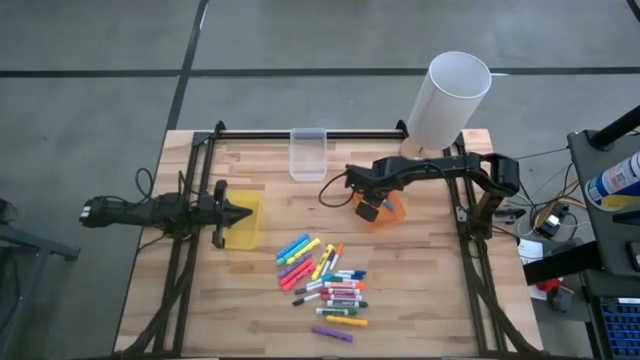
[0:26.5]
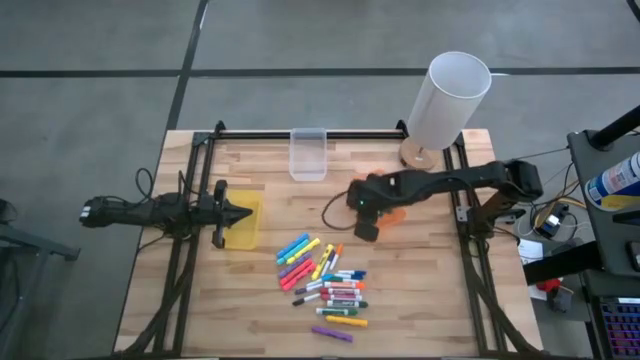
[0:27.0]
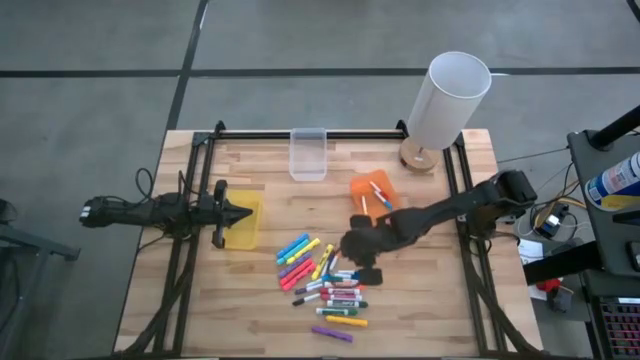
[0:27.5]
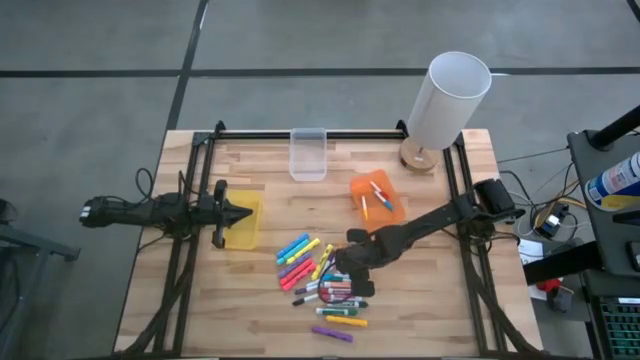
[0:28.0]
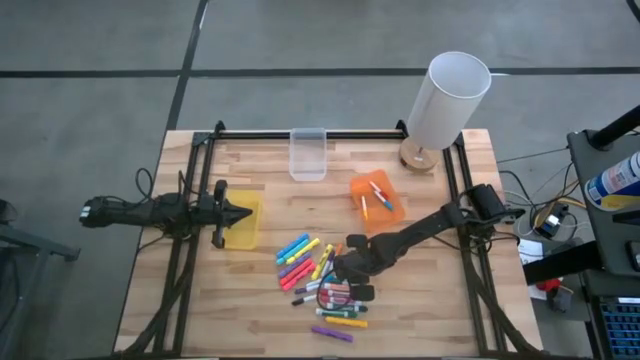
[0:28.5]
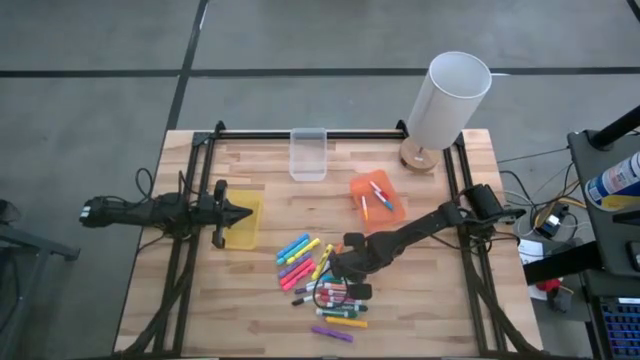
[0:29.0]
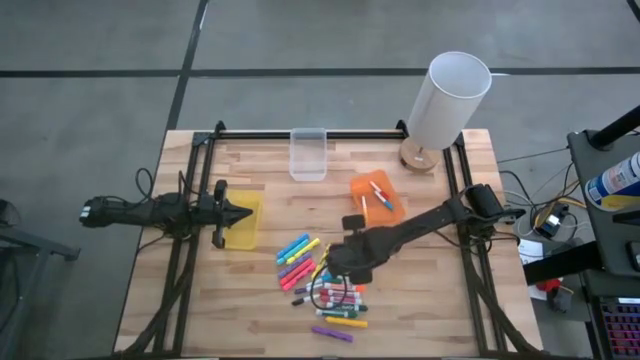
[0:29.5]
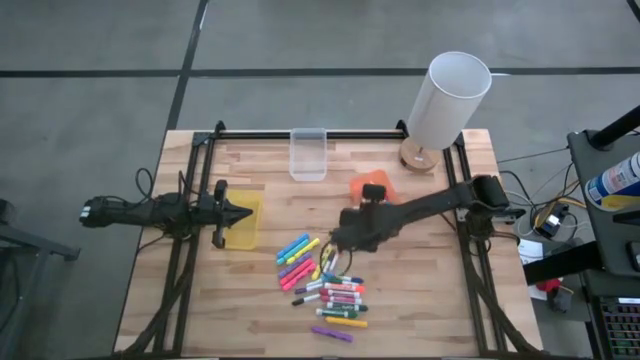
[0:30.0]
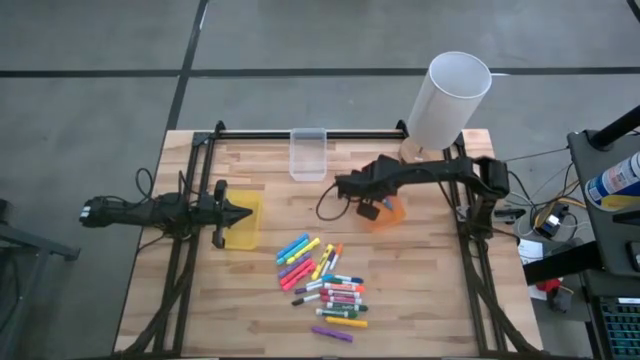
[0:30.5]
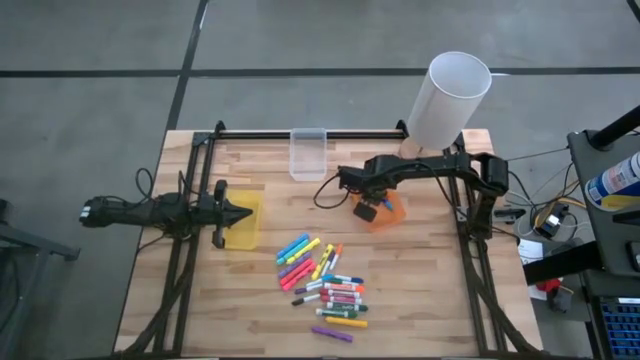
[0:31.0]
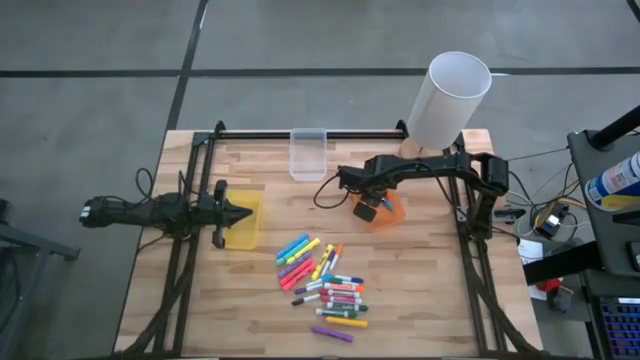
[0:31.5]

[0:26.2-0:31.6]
Task: Pick & Place Markers
Put the top small blue marker into the orange bin

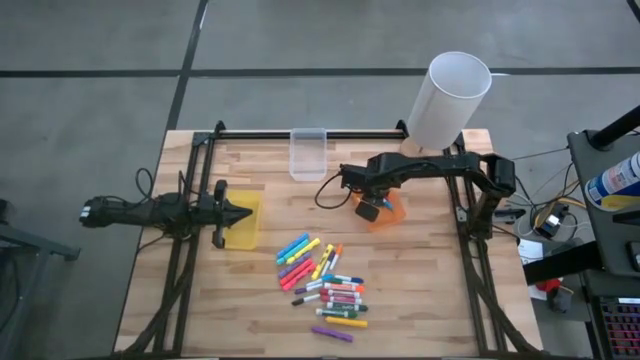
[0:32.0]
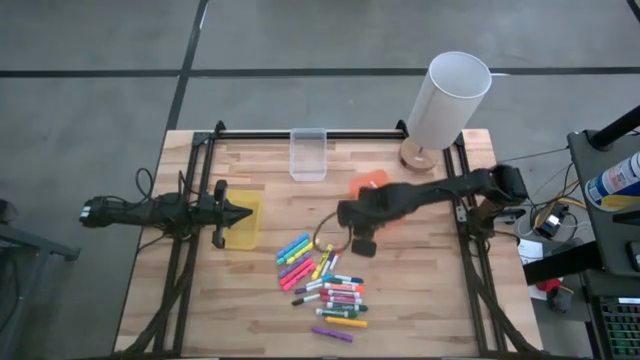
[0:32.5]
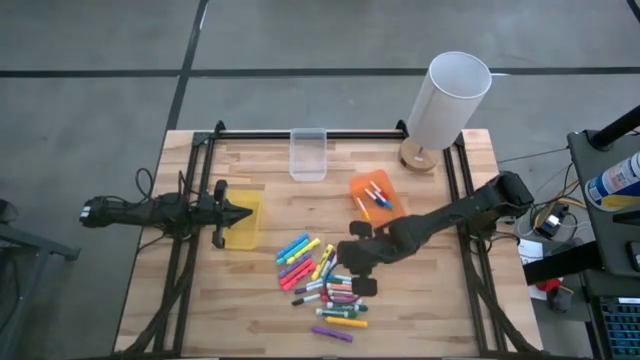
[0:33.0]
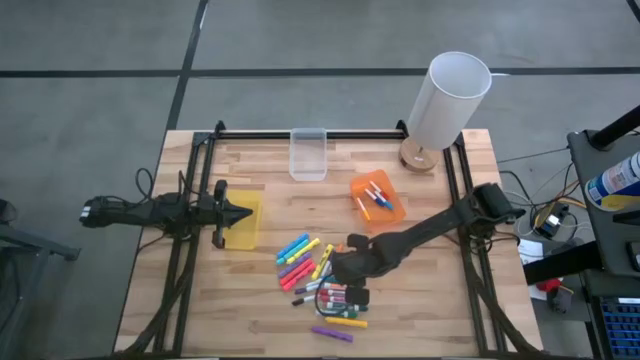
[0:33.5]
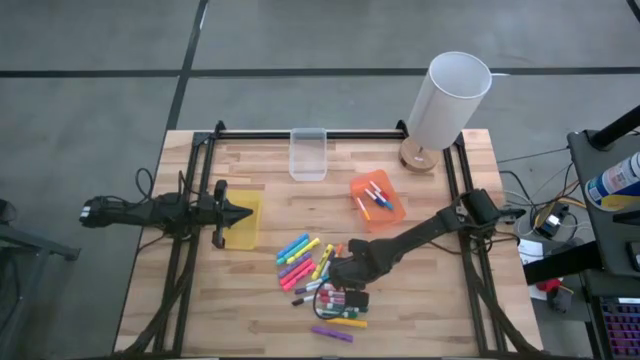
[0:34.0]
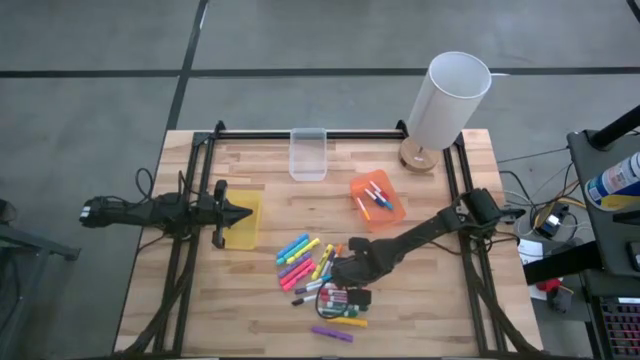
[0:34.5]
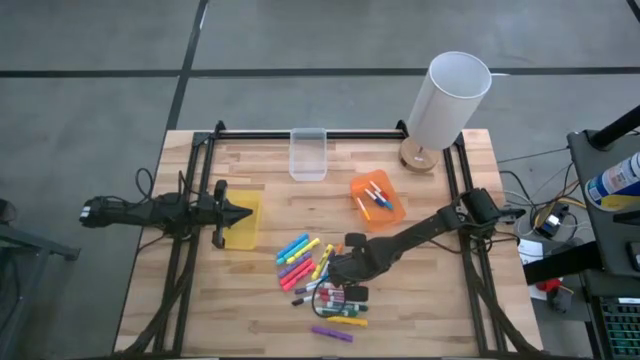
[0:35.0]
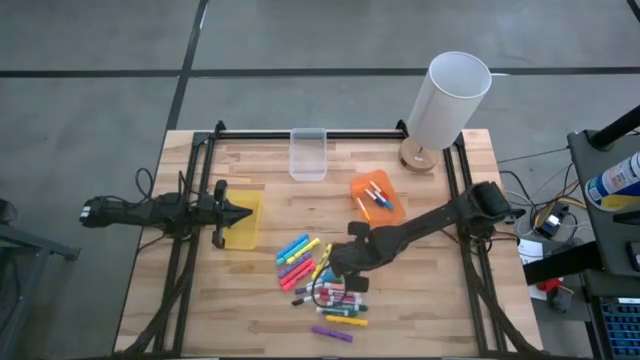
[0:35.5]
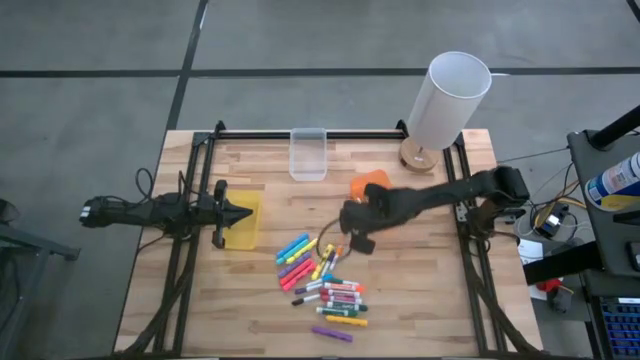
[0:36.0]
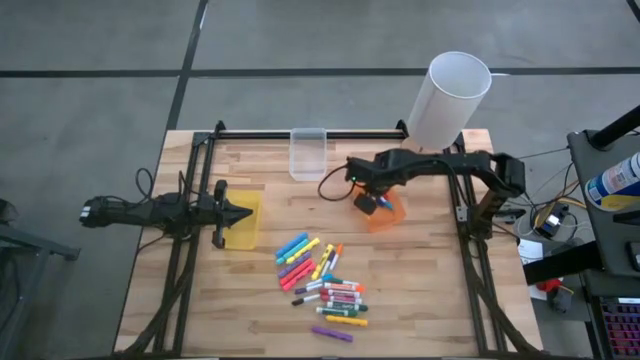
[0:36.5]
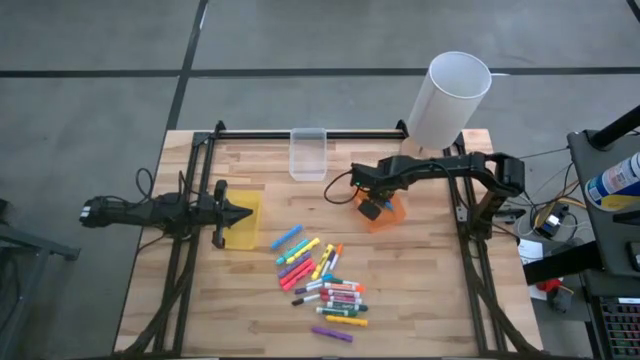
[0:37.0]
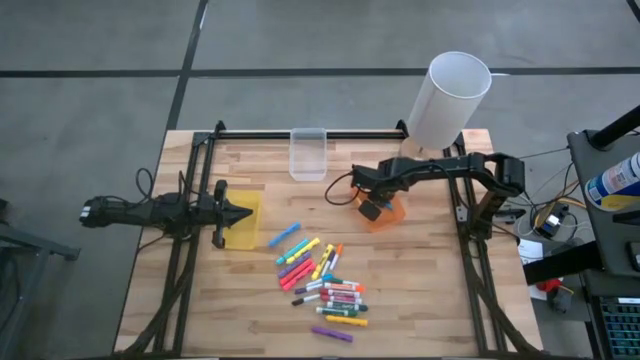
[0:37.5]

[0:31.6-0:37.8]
Put the small blue marker into the orange bin

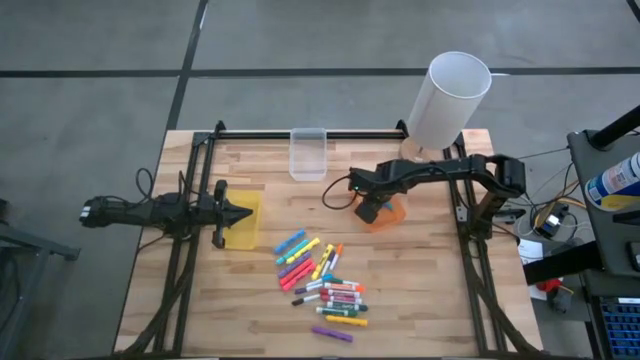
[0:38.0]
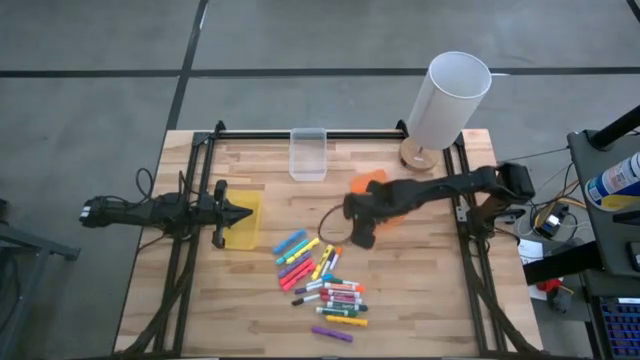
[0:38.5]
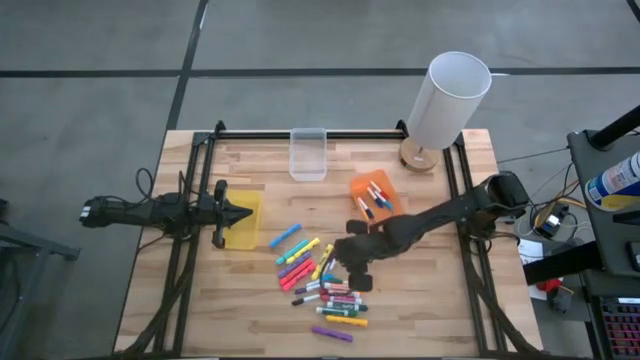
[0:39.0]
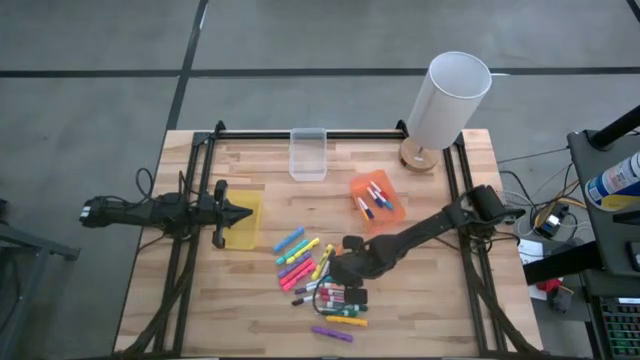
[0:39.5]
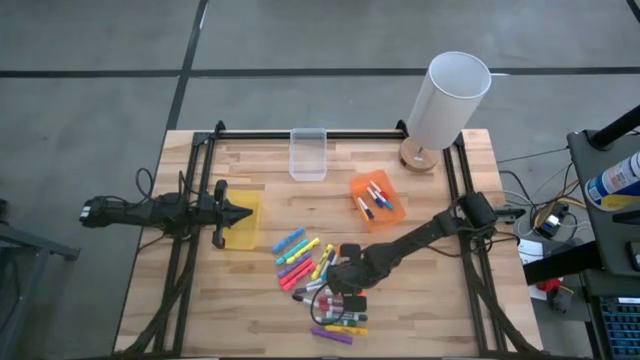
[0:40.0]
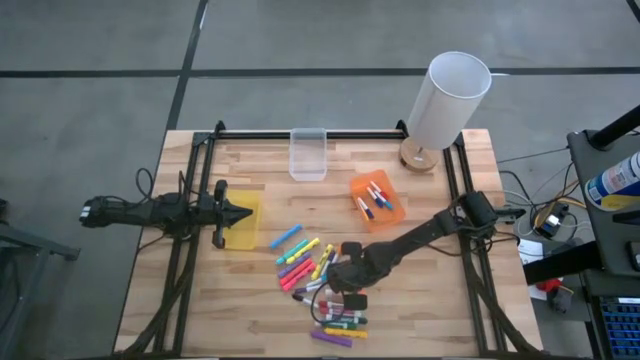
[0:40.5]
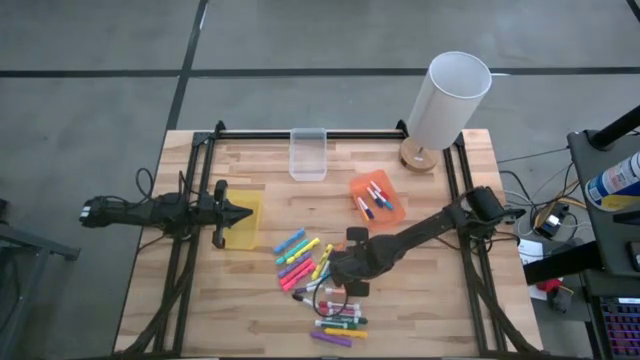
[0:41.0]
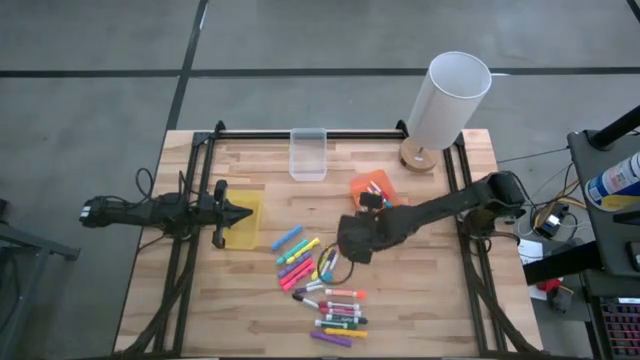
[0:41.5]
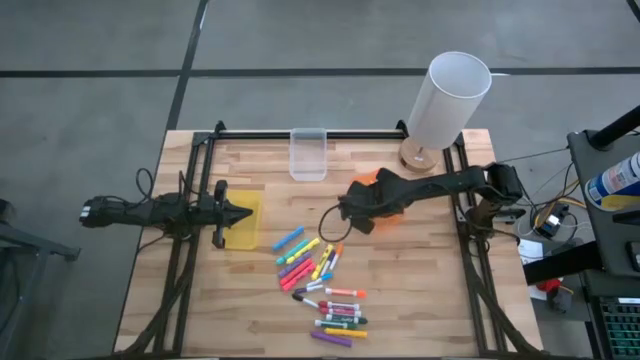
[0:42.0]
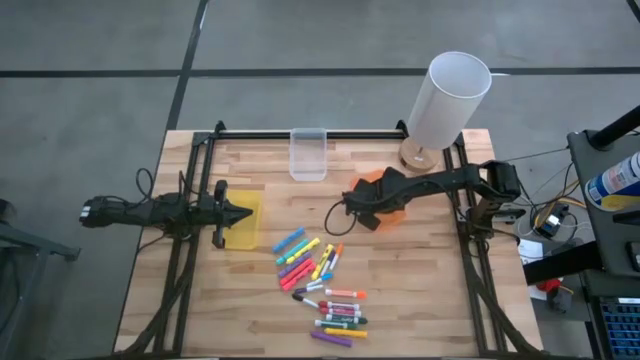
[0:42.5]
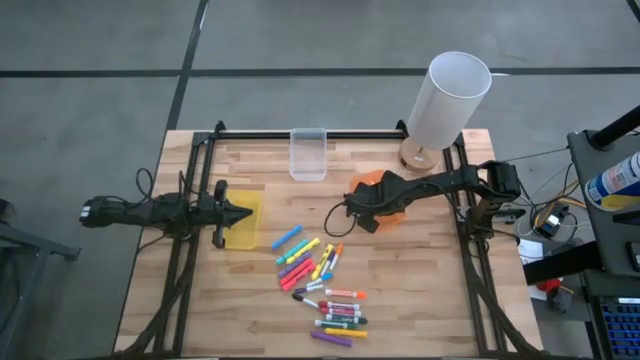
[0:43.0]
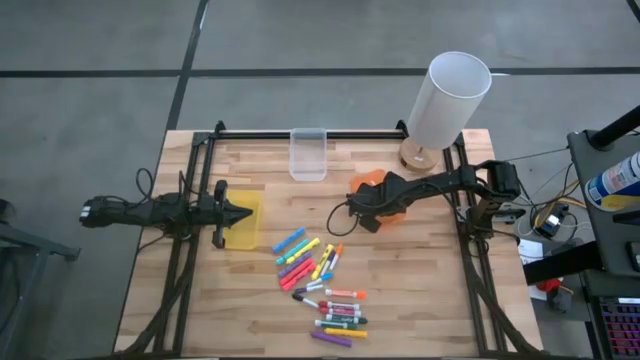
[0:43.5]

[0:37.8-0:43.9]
Put the small green marker into the orange bin

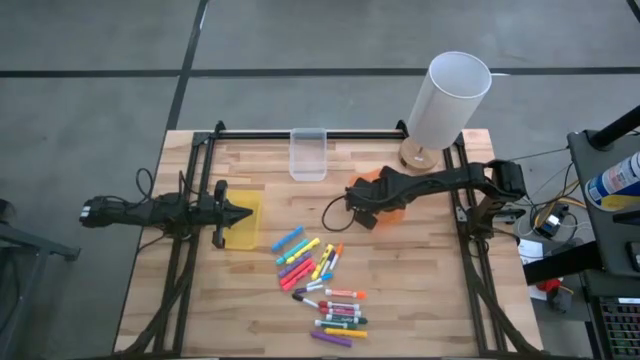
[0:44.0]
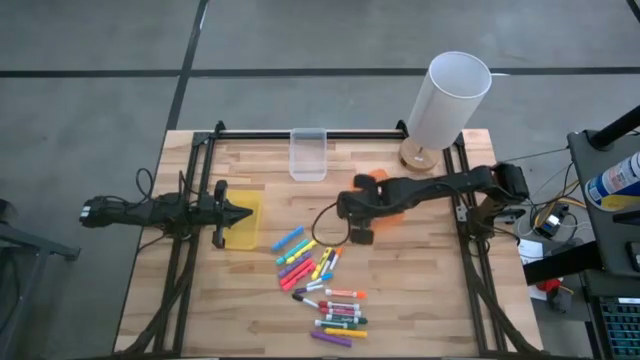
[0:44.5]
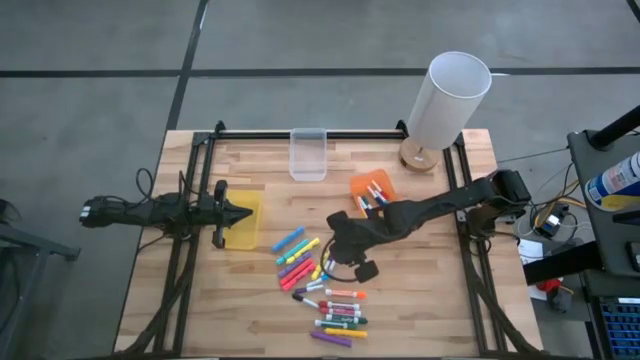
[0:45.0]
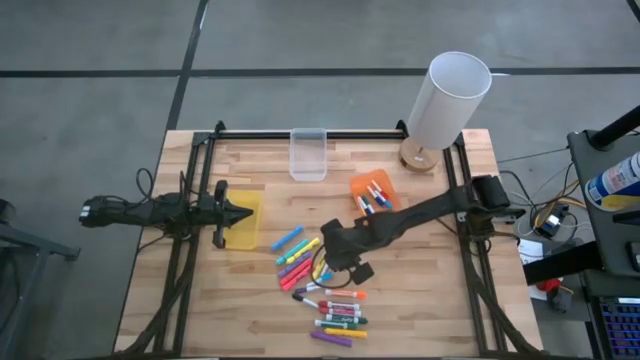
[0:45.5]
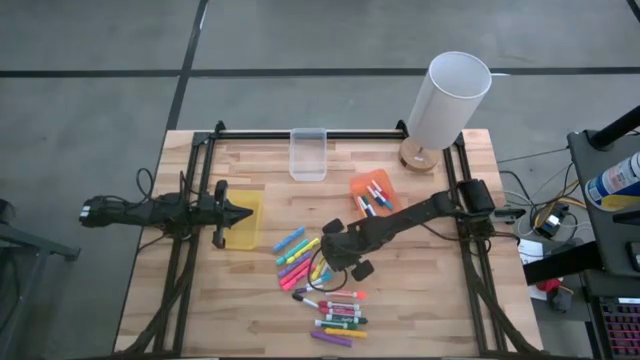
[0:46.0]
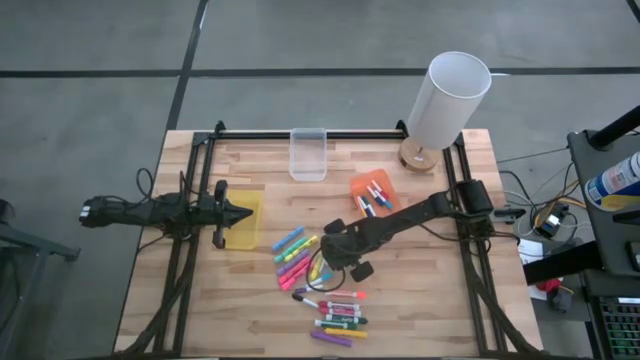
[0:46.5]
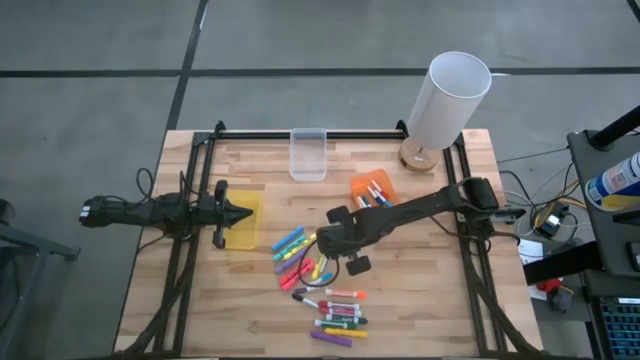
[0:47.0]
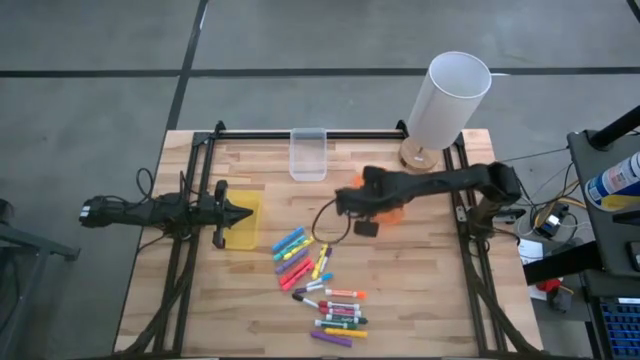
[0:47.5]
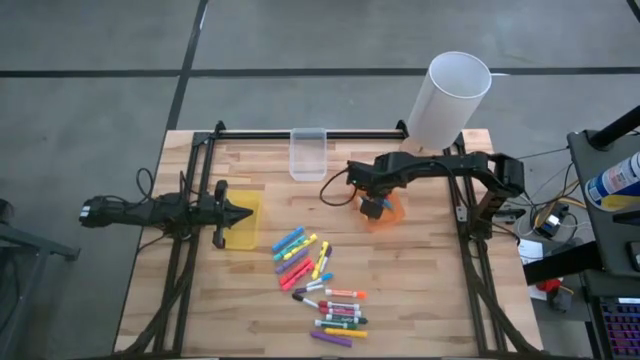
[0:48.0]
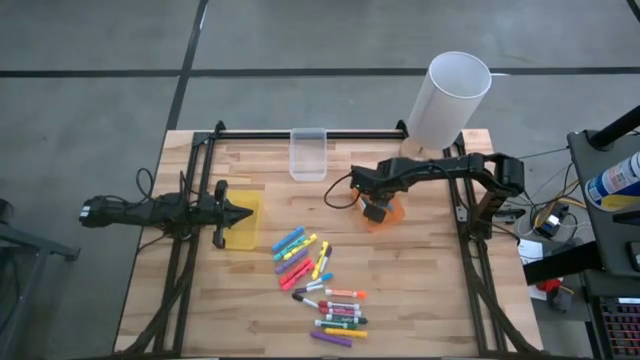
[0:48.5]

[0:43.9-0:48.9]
Put the small orange marker into the orange bin
